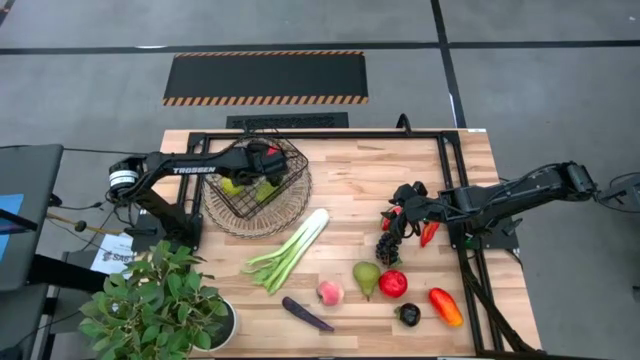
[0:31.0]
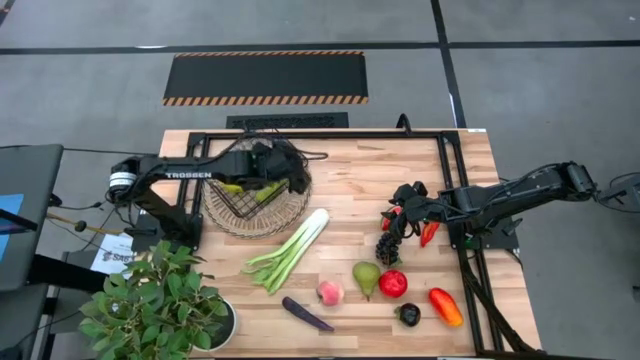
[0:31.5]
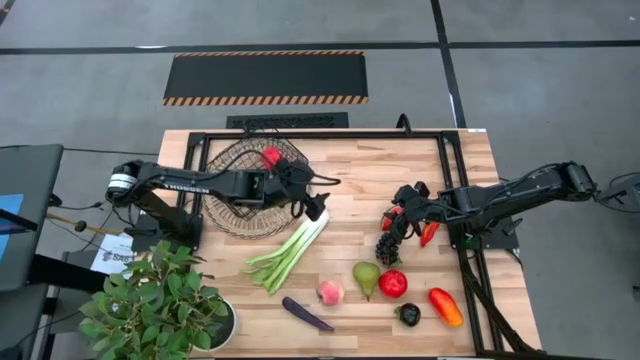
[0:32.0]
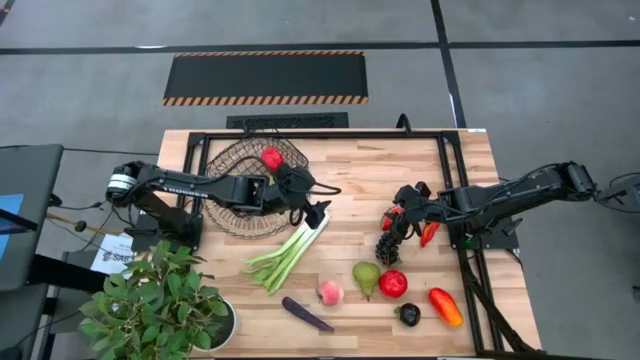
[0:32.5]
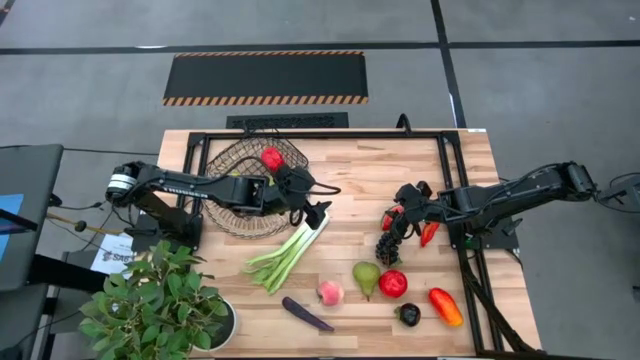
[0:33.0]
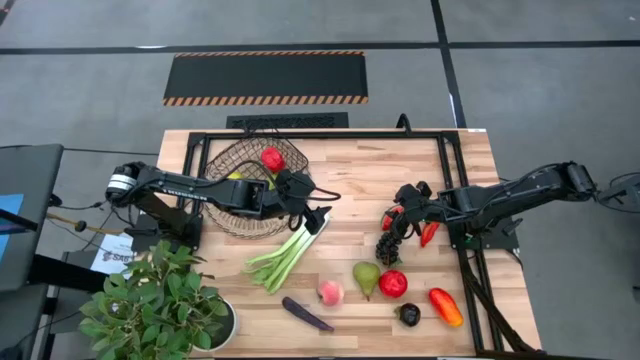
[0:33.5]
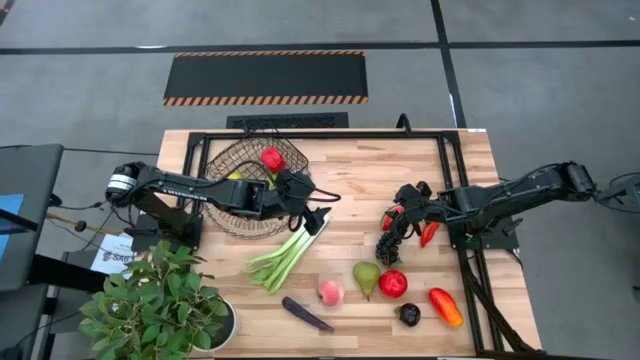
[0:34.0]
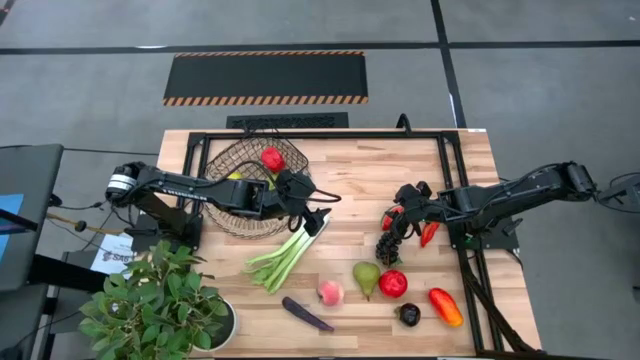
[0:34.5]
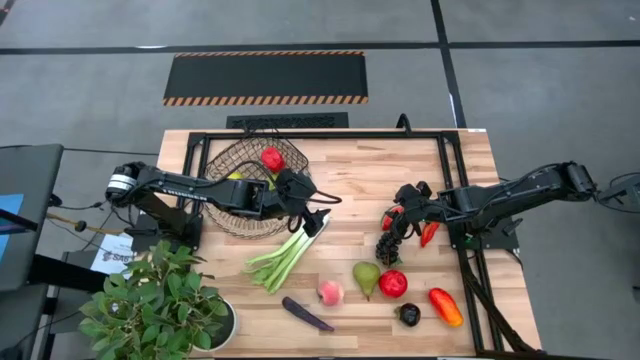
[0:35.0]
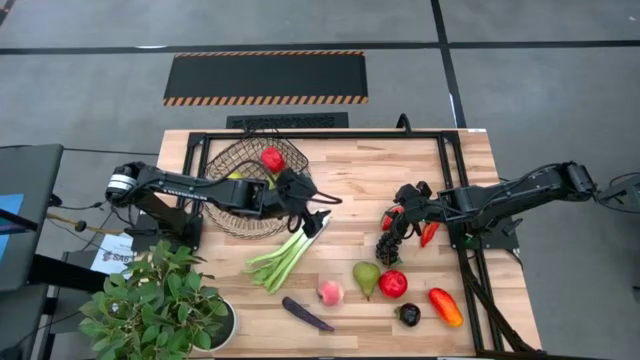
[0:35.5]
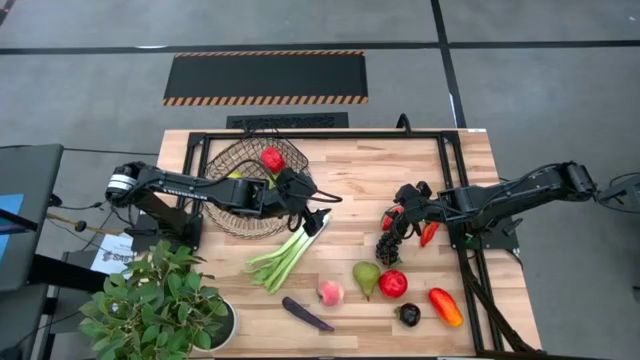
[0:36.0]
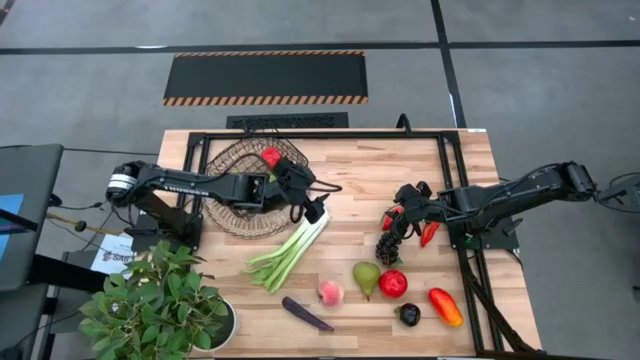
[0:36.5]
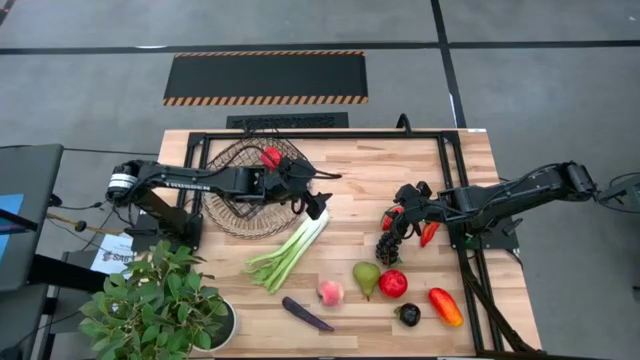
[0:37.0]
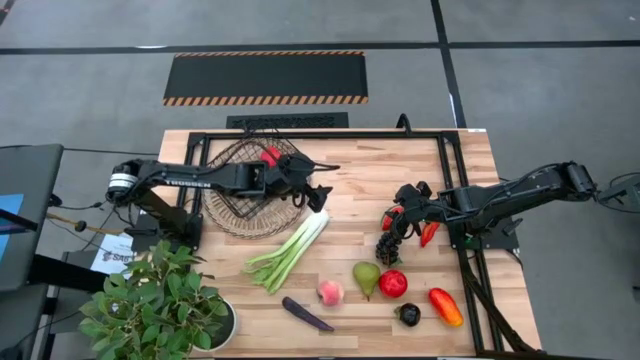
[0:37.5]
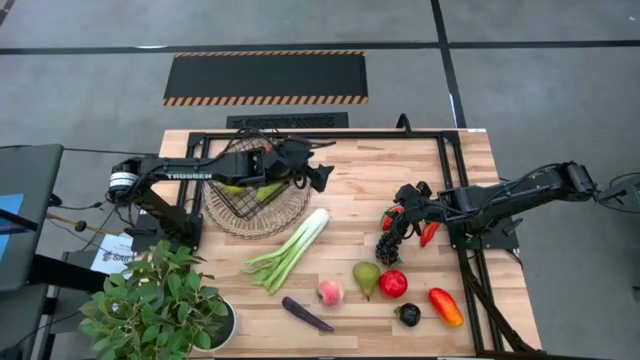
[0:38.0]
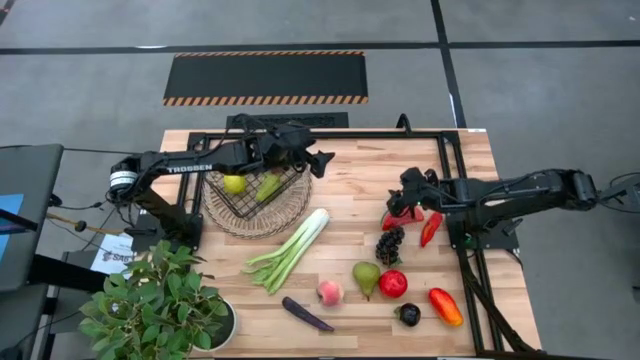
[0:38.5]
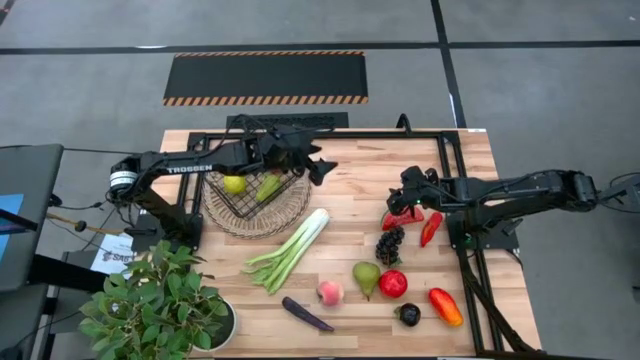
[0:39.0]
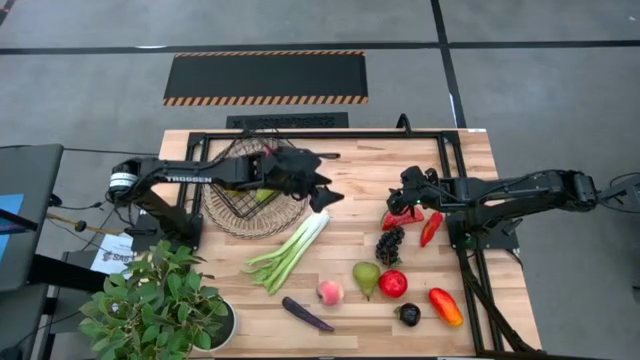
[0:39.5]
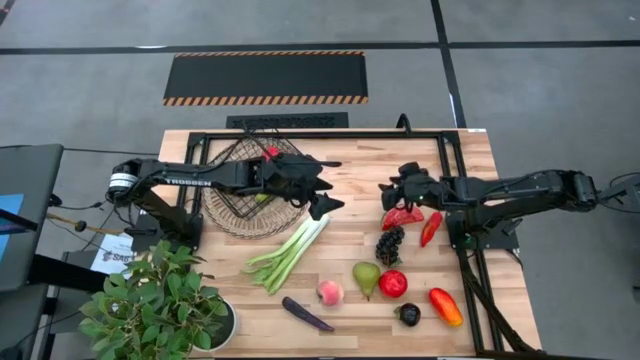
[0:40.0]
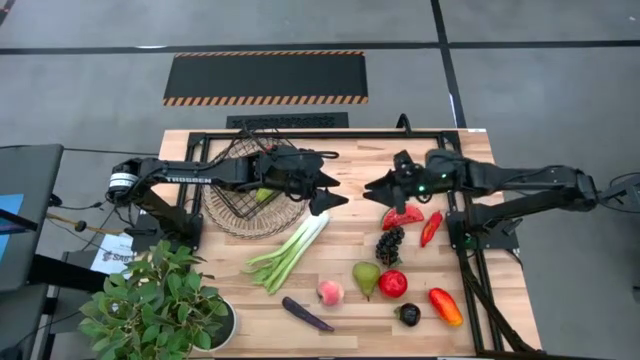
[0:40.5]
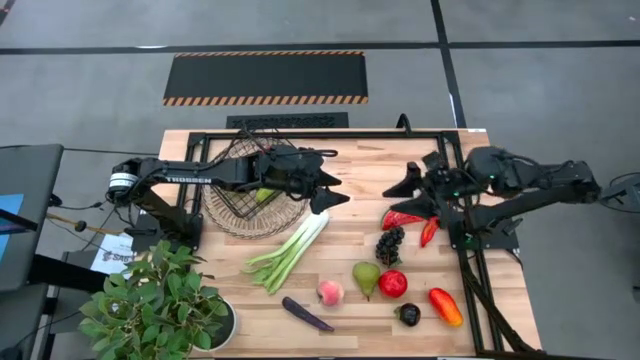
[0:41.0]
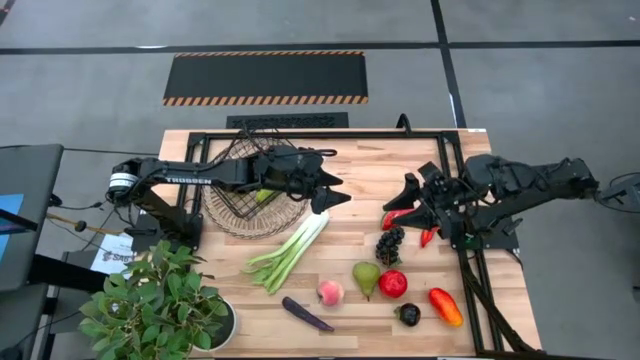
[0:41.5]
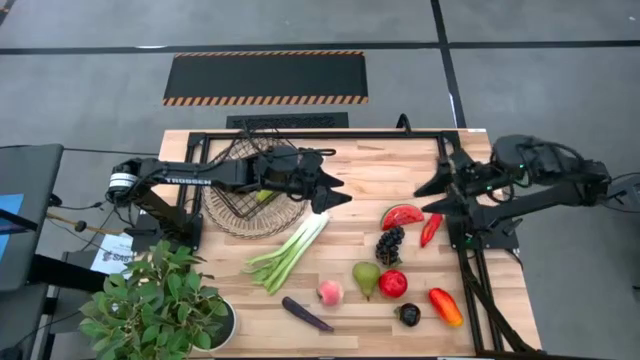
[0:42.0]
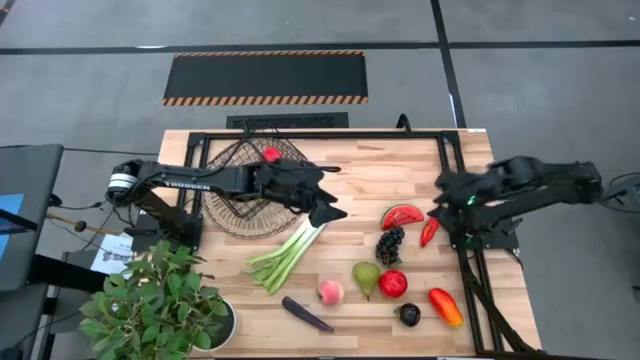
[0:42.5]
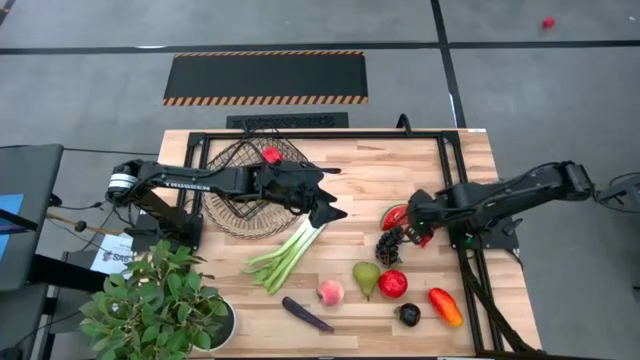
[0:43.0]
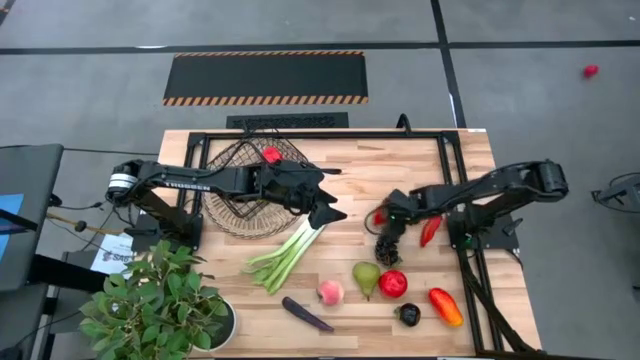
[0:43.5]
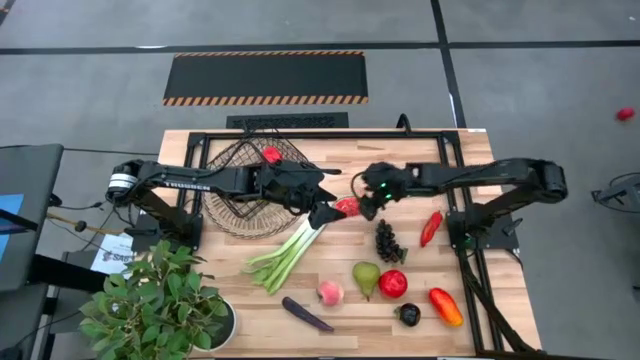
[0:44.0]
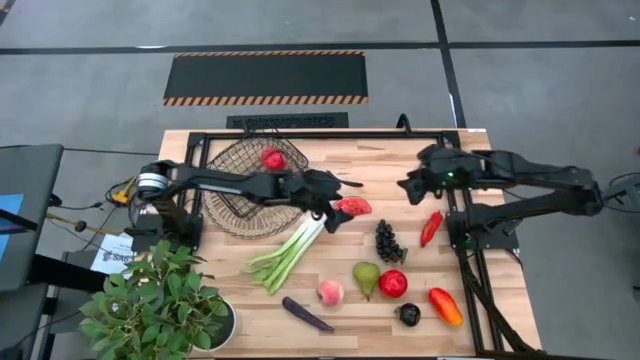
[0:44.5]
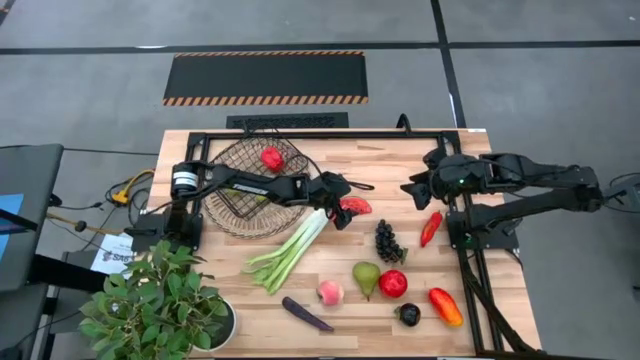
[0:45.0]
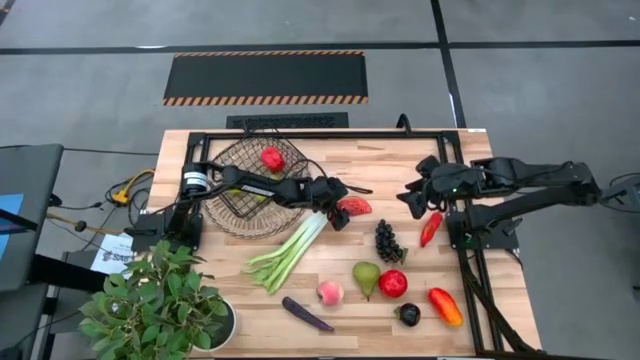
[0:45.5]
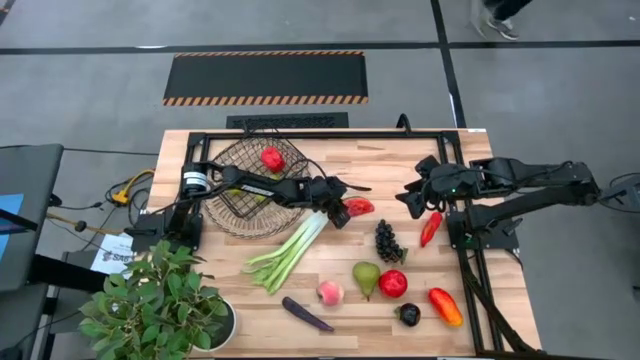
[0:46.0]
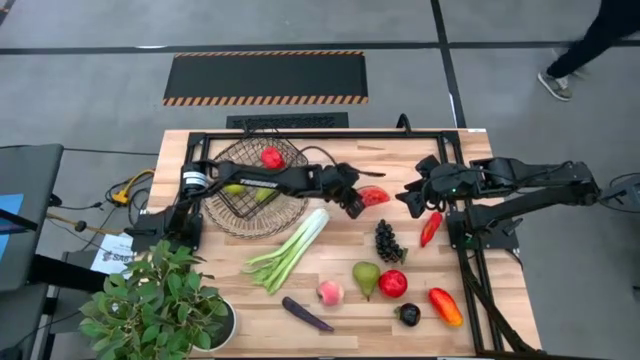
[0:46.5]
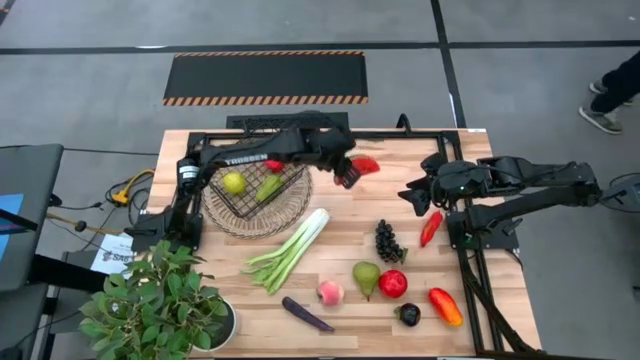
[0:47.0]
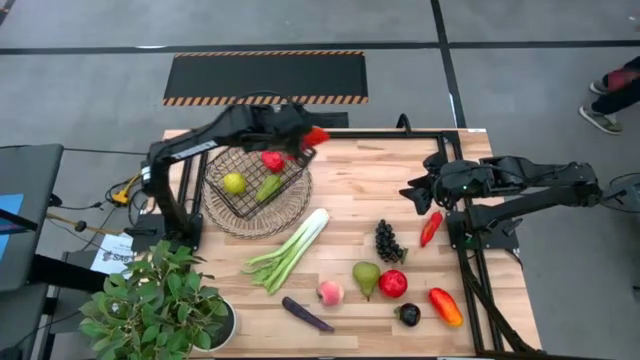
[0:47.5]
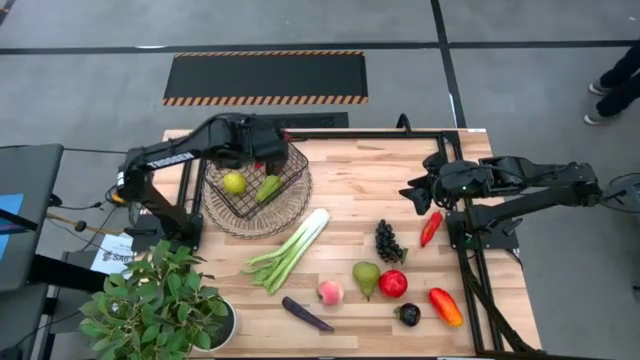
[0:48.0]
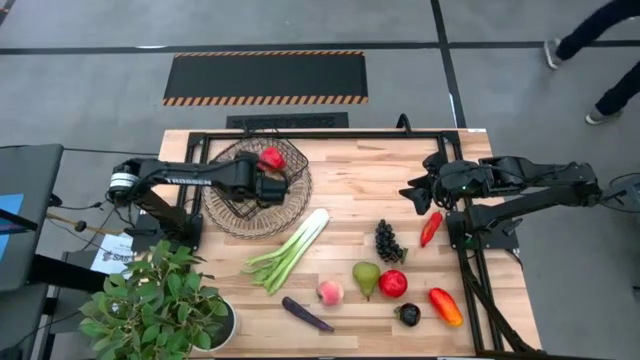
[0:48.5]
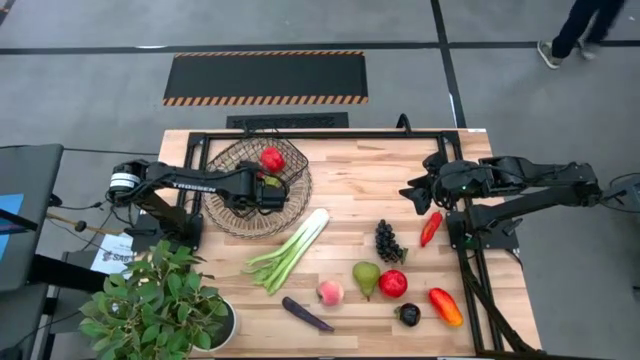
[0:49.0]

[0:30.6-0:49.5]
Task: Build produce basket
Put the red watermelon into the wire basket

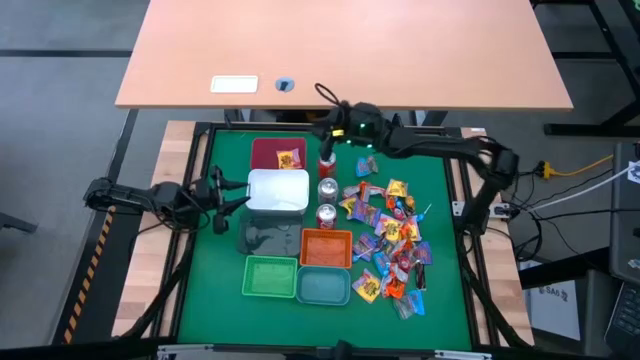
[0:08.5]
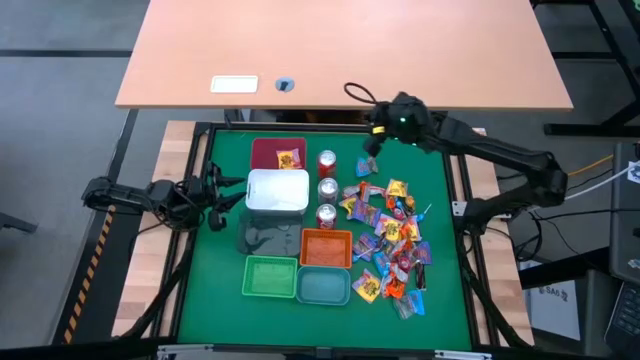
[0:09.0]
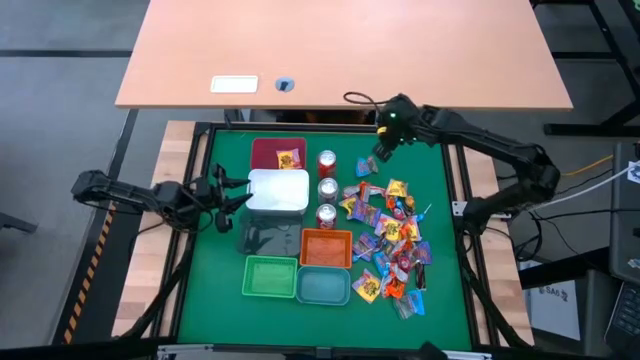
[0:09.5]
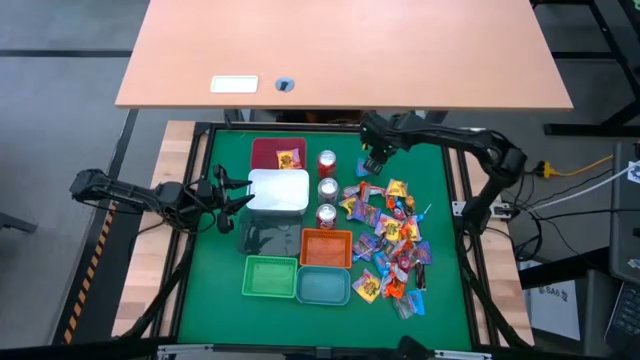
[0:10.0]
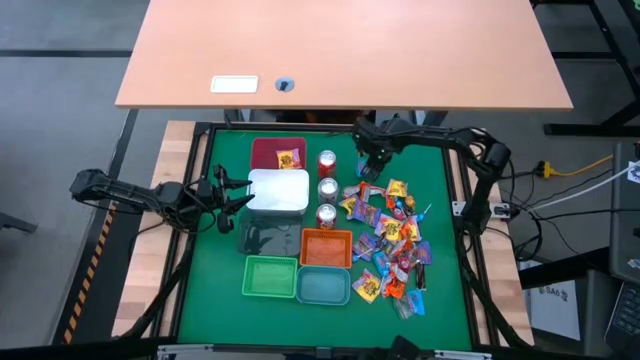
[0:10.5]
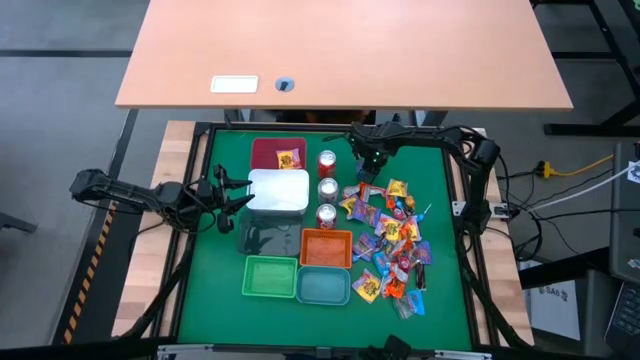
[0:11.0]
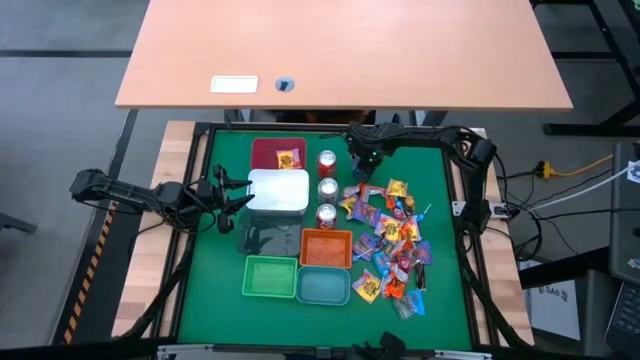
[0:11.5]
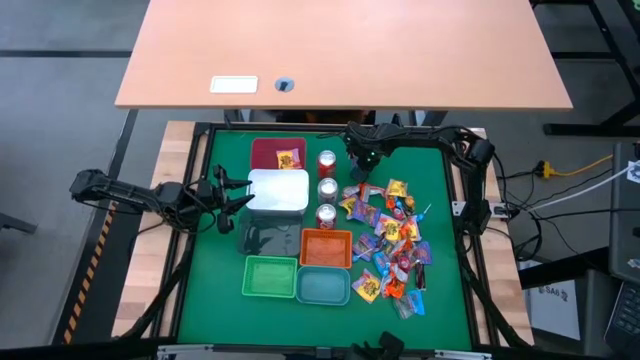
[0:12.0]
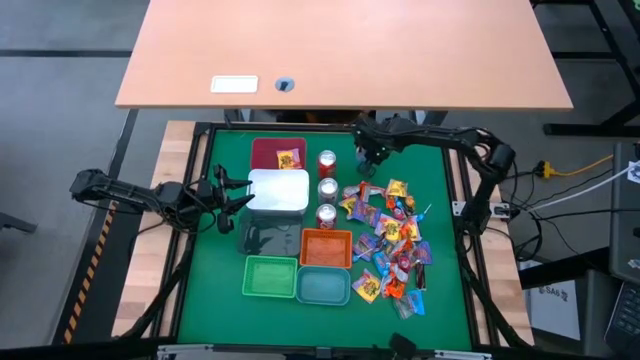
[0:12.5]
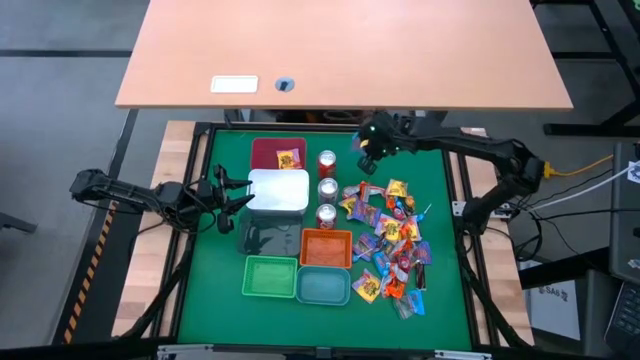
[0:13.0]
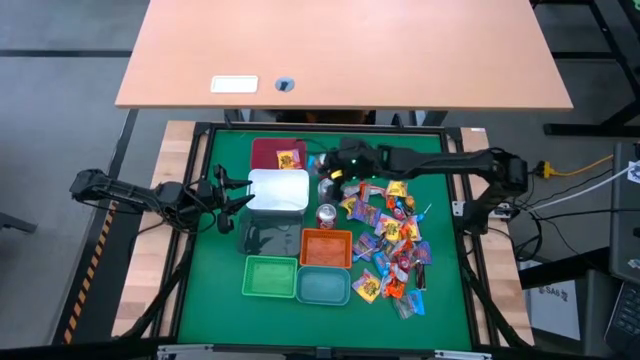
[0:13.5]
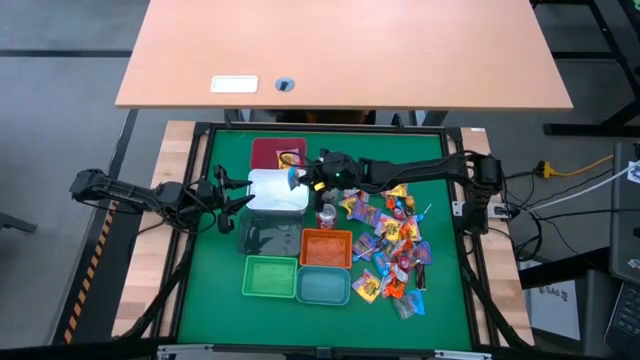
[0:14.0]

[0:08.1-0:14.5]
Task: Sort candy
Put the violet candy into the white bin
